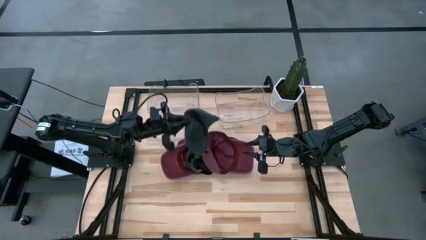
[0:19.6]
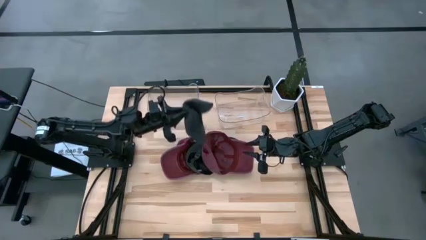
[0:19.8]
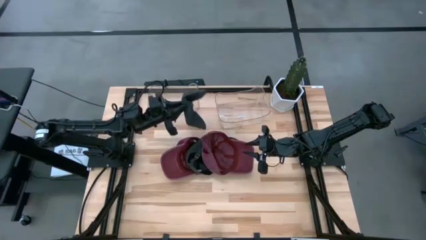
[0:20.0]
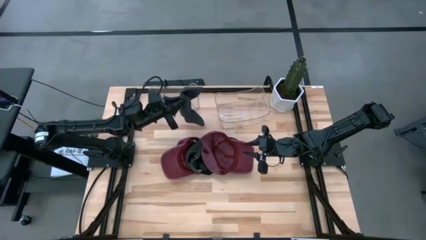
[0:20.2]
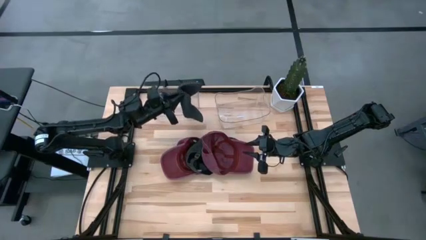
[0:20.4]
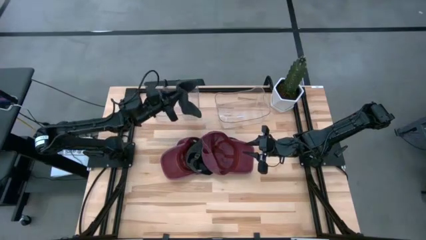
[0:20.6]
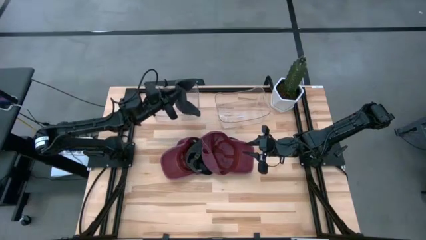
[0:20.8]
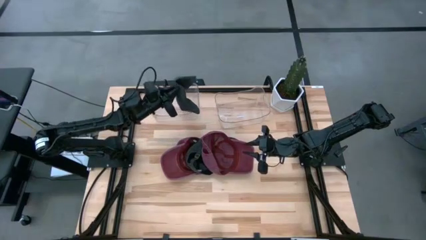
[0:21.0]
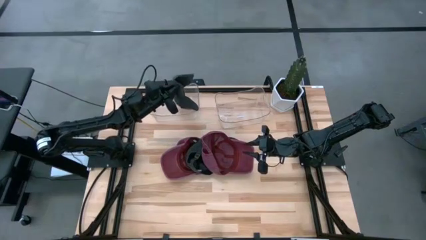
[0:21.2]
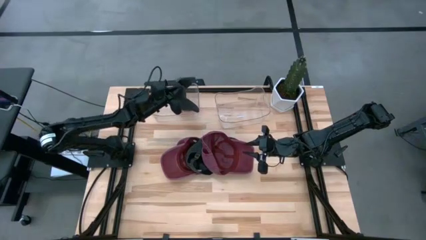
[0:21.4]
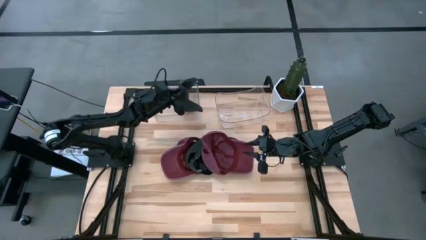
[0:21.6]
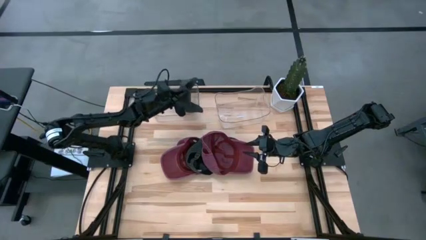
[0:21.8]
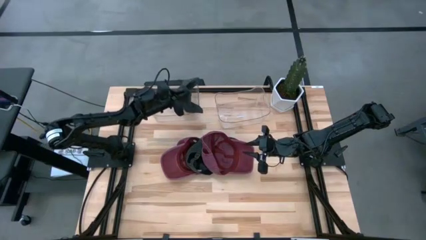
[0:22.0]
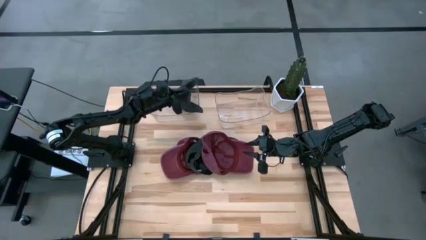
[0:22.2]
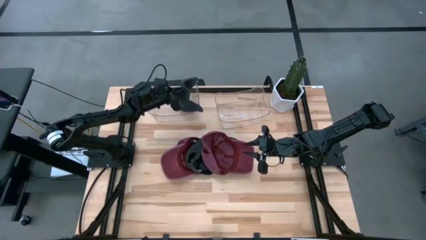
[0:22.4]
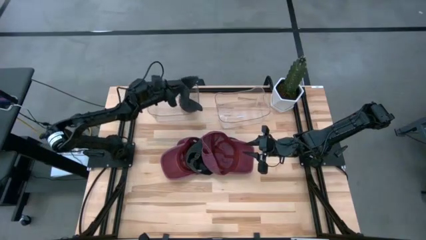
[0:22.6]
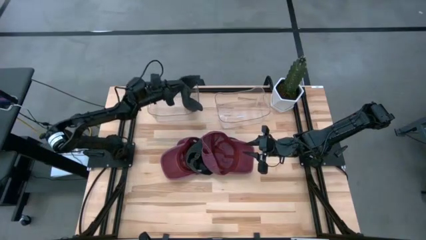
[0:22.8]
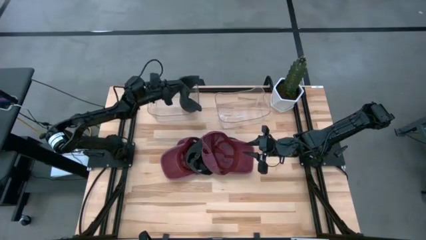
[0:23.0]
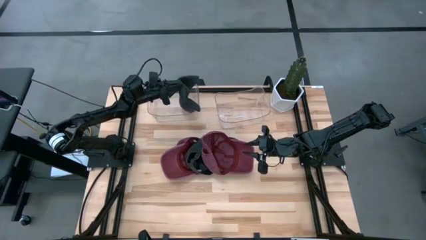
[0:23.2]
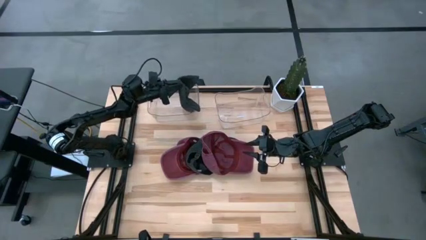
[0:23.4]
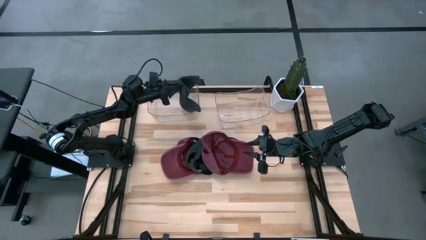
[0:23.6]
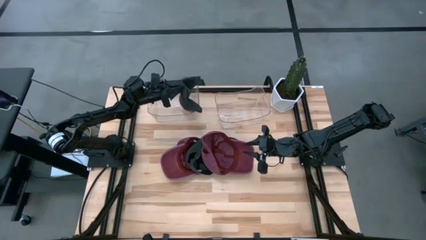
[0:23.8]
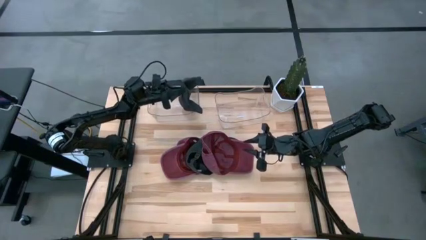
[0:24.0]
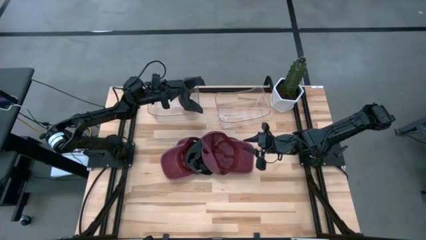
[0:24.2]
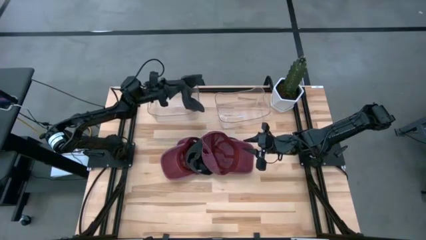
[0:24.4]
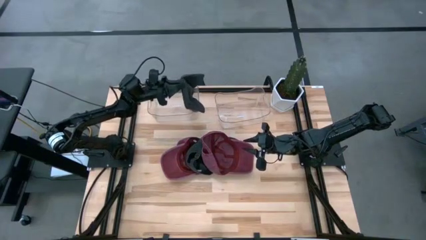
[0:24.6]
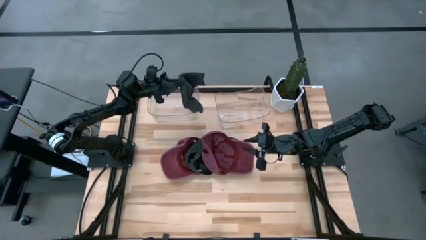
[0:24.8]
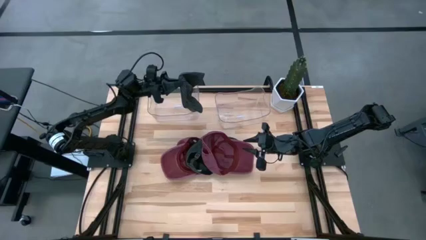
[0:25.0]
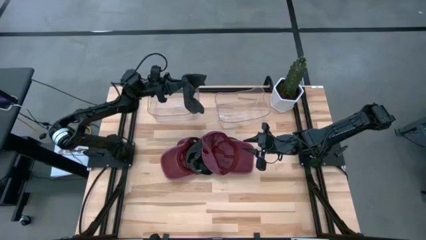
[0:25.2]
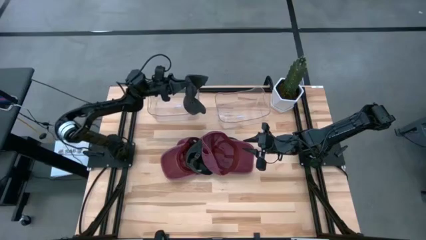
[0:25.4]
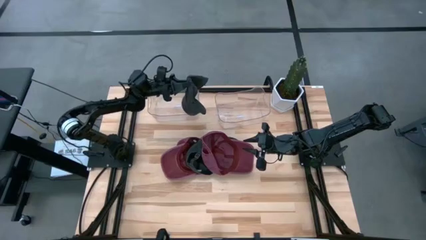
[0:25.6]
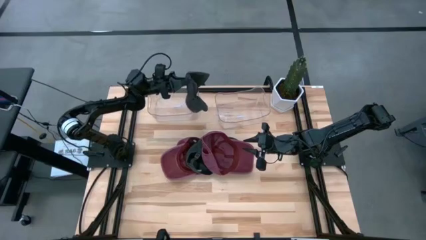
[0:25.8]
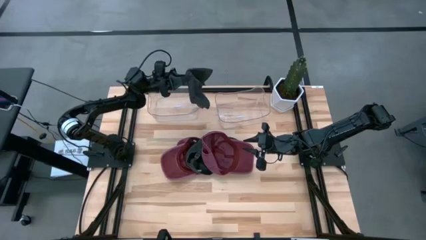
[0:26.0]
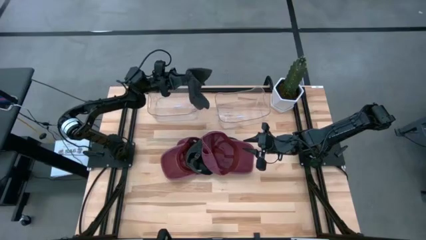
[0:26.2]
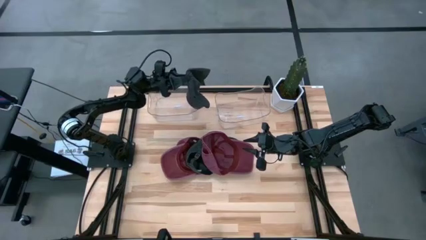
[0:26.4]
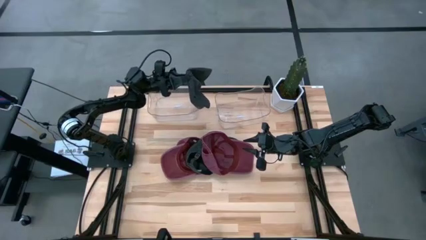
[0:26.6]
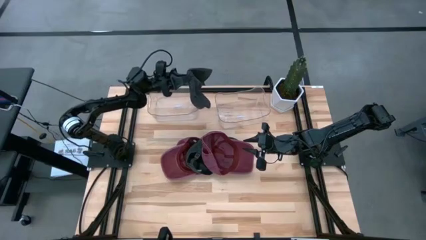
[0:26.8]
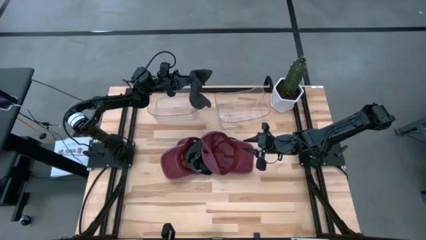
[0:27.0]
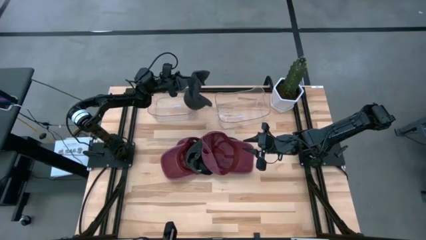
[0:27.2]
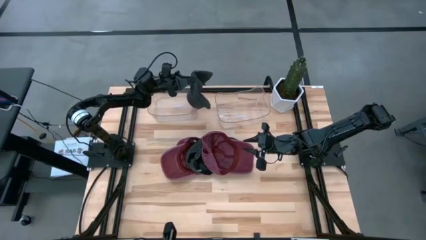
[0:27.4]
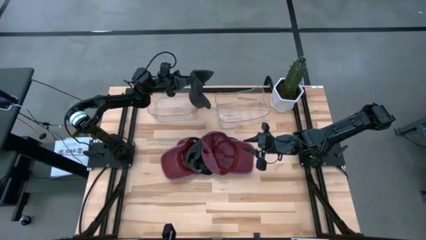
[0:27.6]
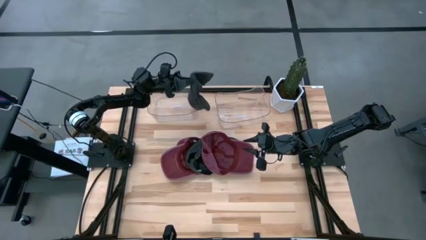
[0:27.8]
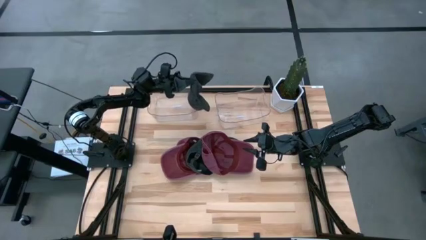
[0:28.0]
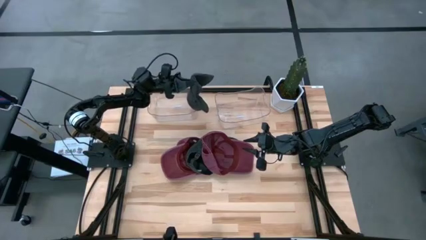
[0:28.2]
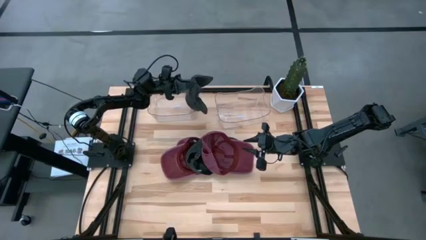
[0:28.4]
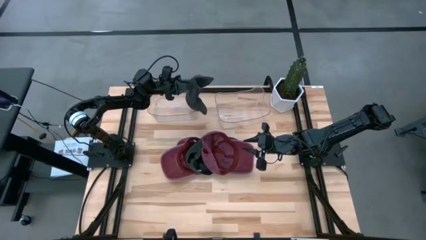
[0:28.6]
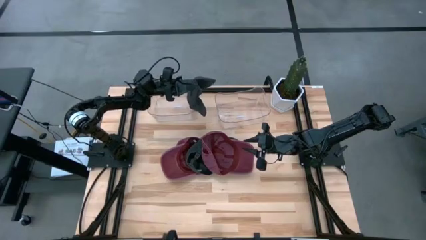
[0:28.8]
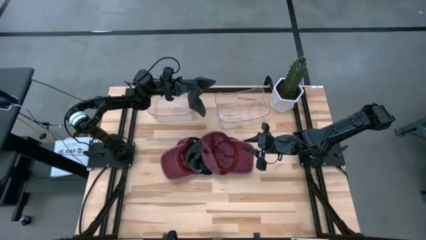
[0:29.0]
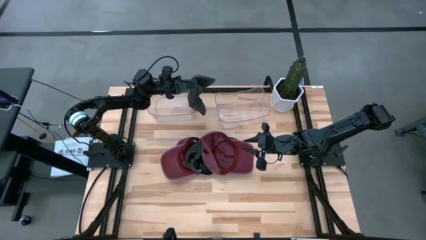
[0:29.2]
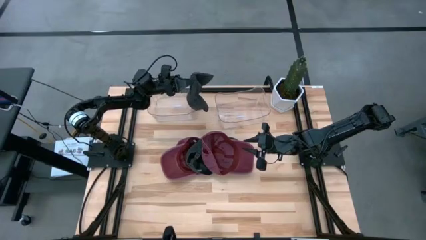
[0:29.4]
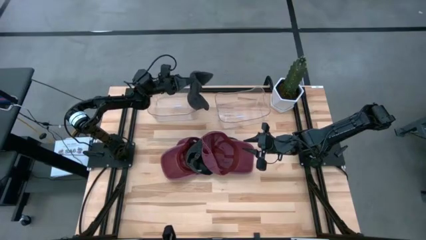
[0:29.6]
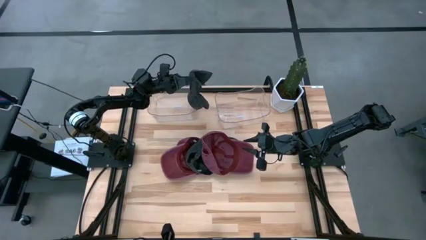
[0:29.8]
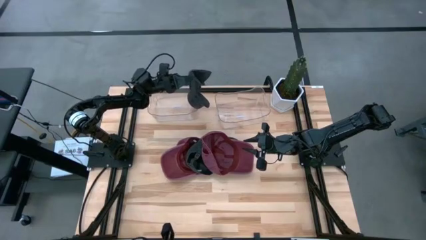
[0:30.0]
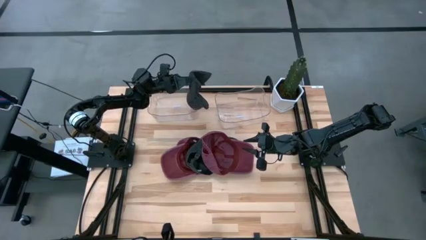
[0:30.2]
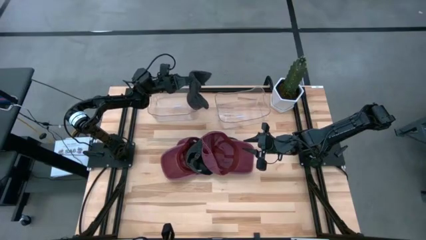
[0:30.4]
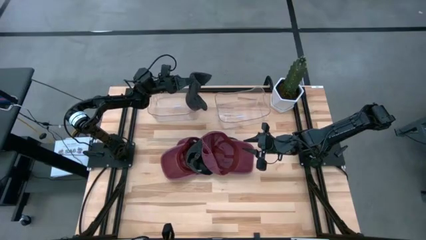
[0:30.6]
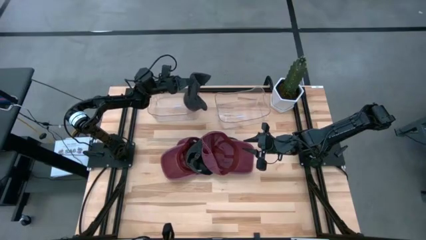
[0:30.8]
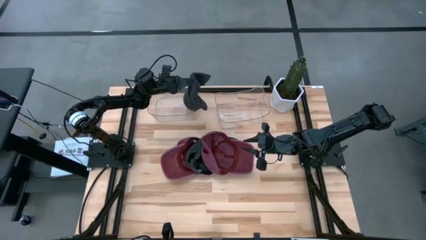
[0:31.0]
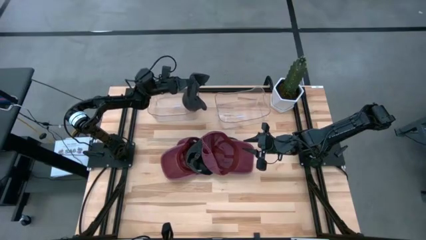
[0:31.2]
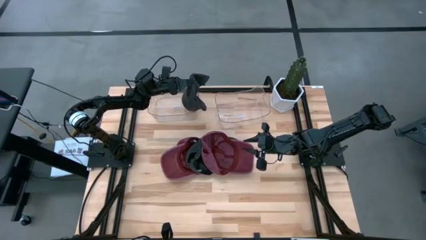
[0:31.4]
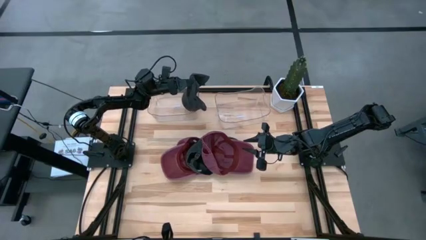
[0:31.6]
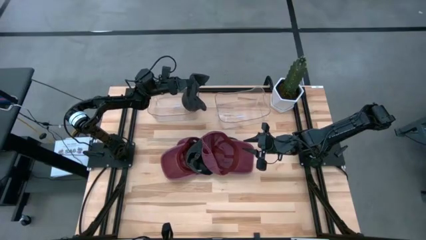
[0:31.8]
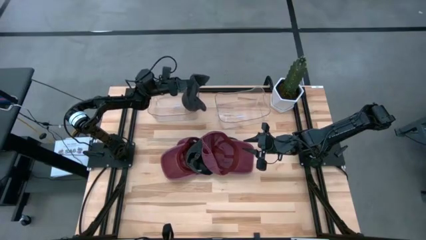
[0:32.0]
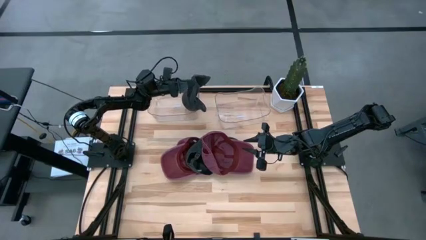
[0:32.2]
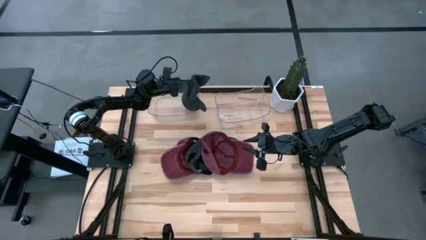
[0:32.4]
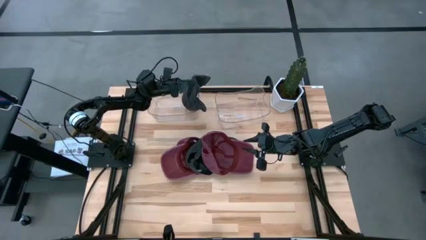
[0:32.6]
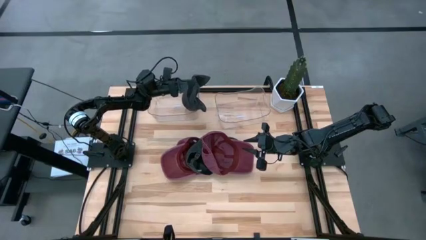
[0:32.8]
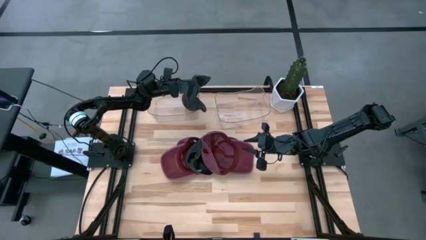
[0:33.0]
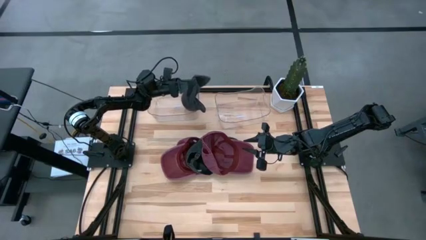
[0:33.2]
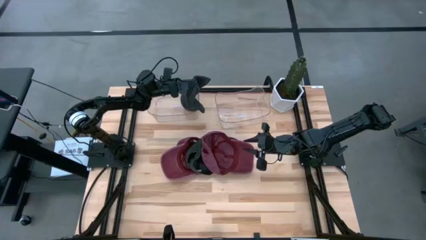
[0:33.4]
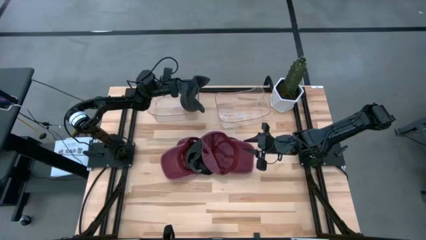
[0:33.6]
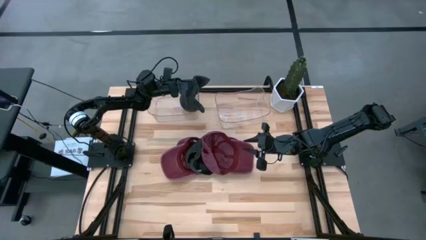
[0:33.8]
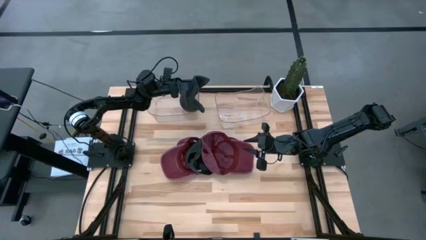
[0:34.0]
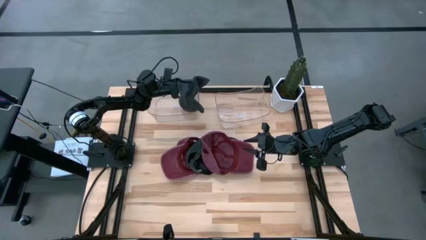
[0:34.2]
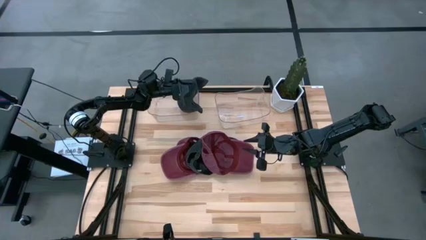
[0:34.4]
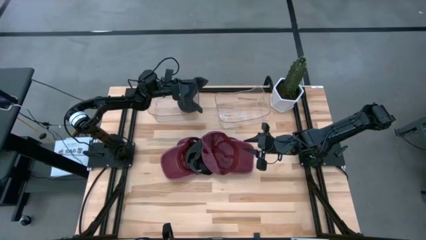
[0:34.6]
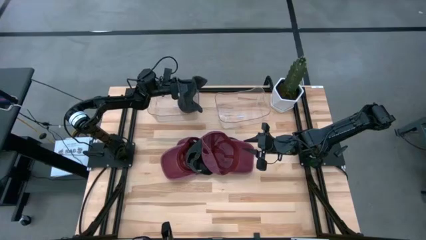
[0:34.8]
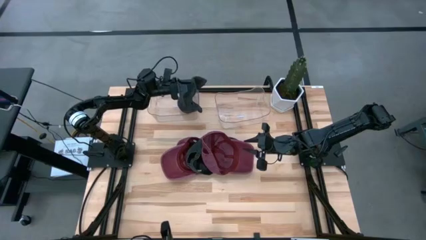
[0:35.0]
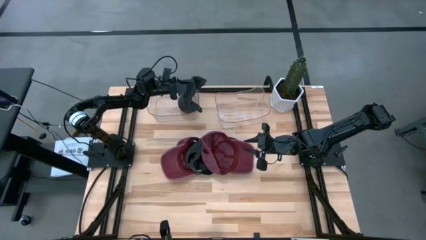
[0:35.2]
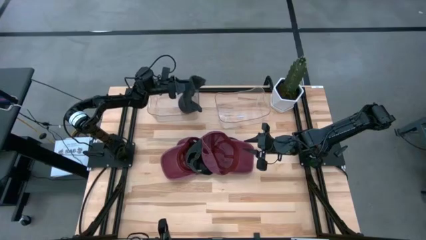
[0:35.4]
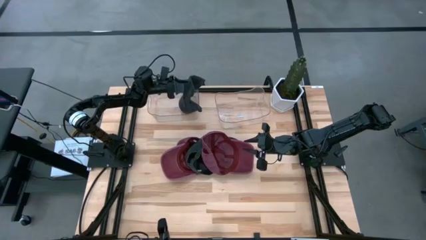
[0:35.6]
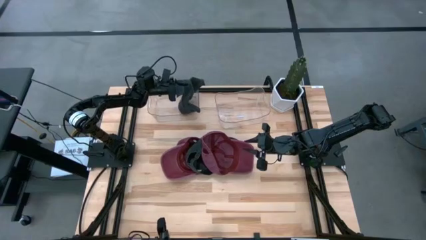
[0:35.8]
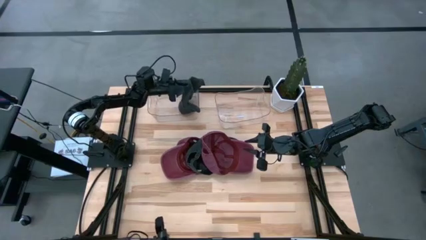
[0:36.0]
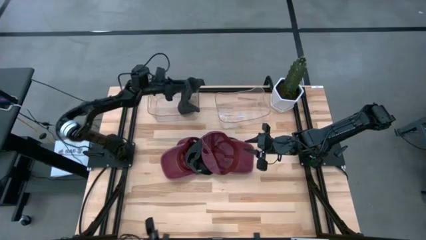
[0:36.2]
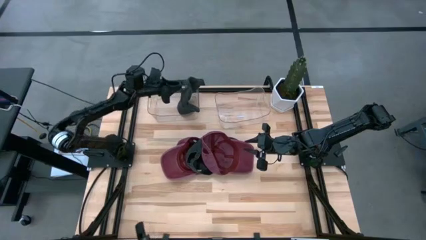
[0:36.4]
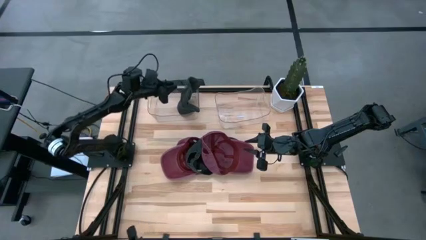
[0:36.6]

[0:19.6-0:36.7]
Task: Pick & Place hat
Put the black cap into the left transparent bin
